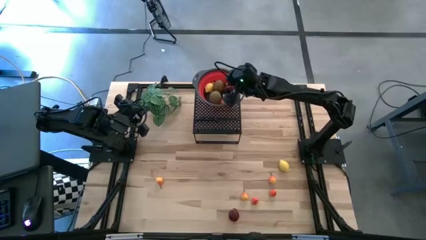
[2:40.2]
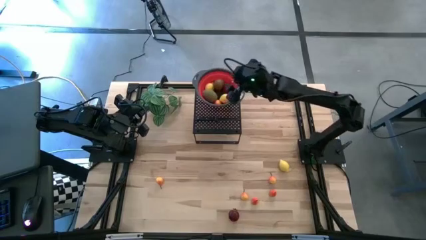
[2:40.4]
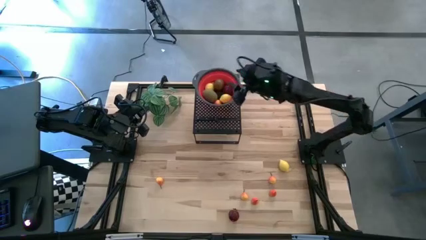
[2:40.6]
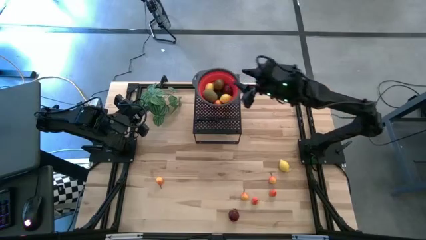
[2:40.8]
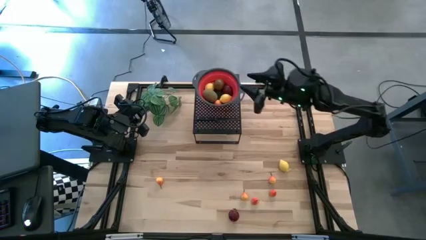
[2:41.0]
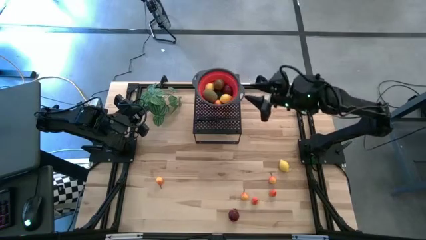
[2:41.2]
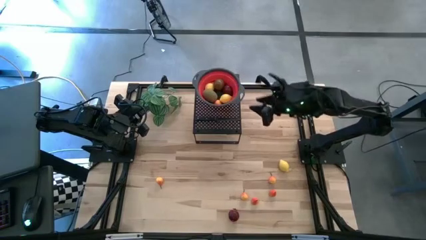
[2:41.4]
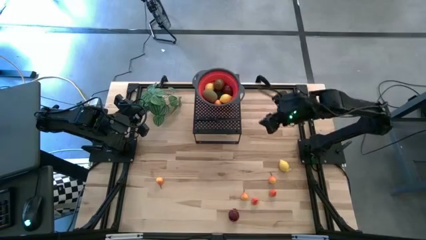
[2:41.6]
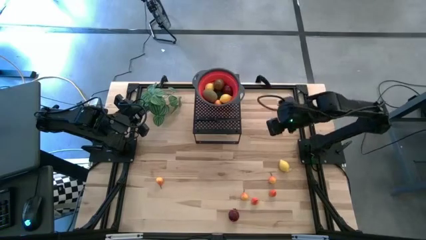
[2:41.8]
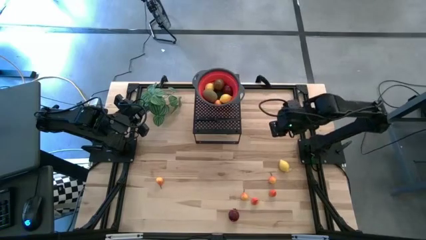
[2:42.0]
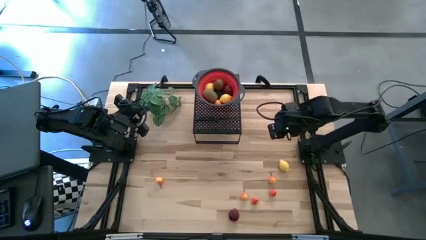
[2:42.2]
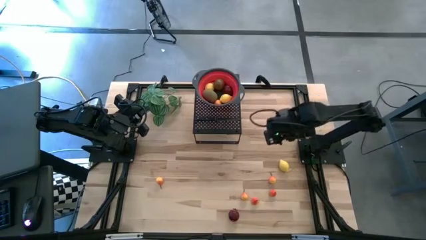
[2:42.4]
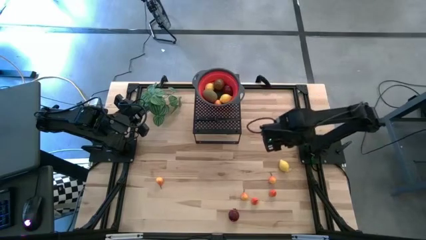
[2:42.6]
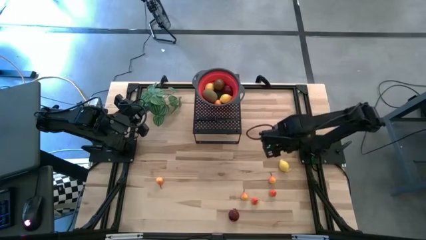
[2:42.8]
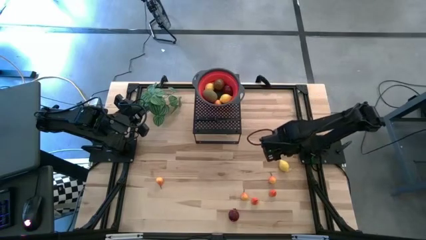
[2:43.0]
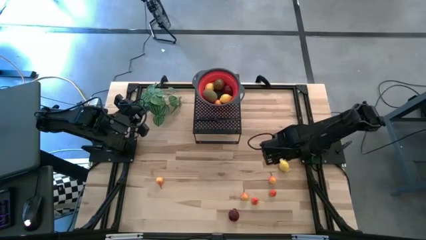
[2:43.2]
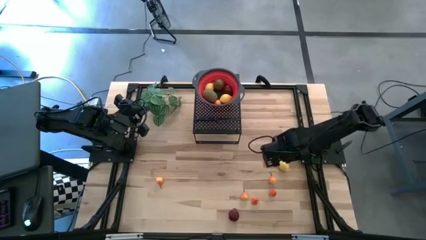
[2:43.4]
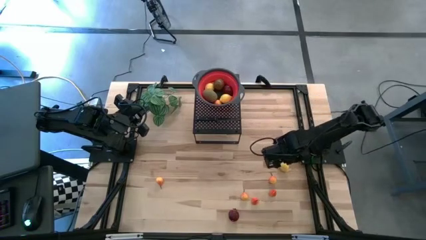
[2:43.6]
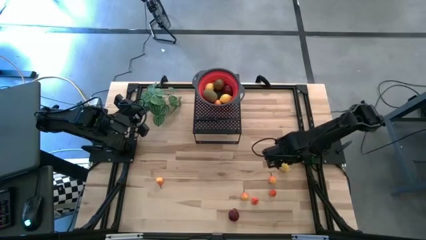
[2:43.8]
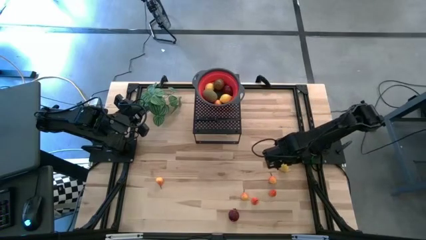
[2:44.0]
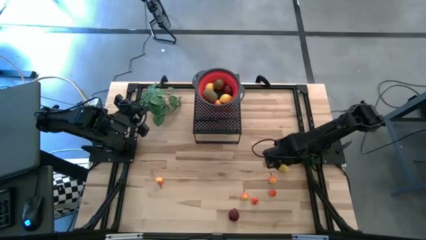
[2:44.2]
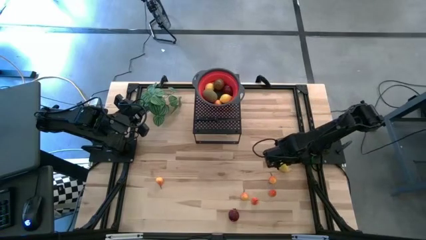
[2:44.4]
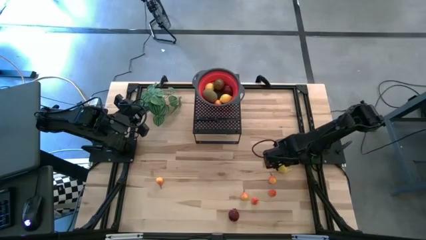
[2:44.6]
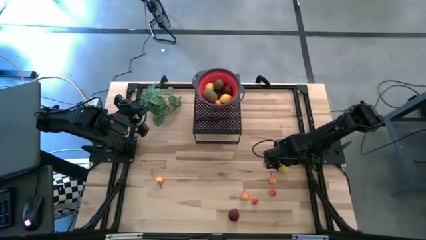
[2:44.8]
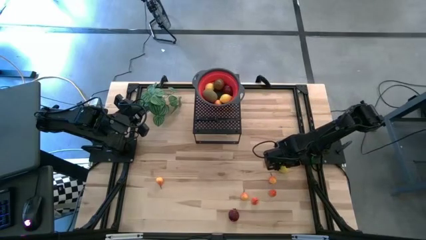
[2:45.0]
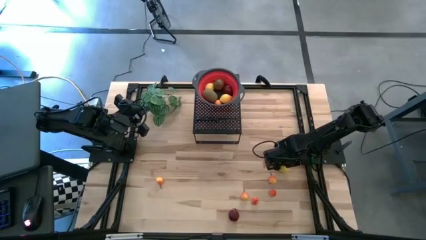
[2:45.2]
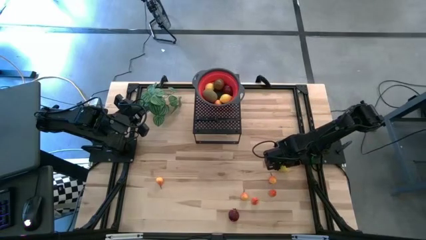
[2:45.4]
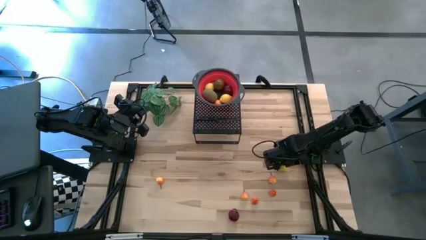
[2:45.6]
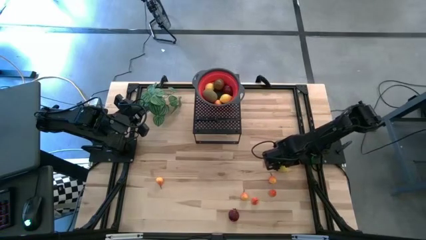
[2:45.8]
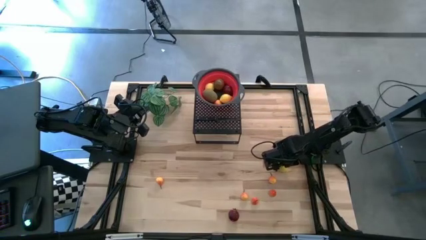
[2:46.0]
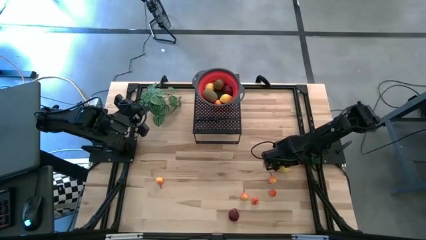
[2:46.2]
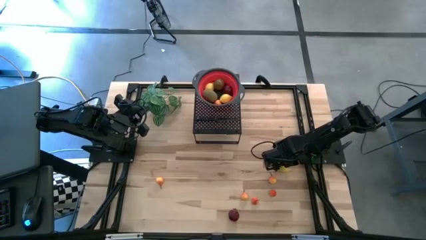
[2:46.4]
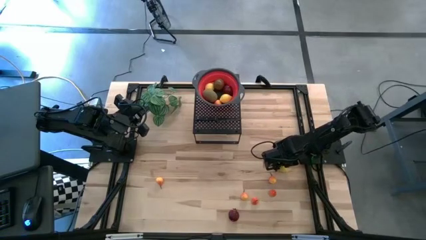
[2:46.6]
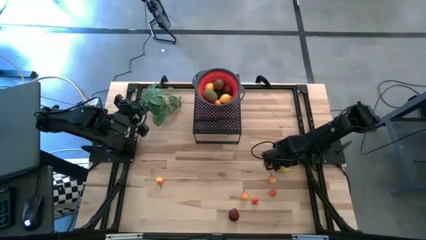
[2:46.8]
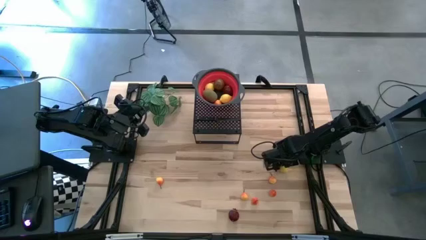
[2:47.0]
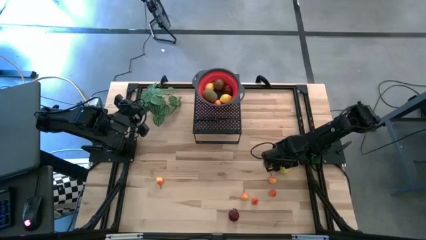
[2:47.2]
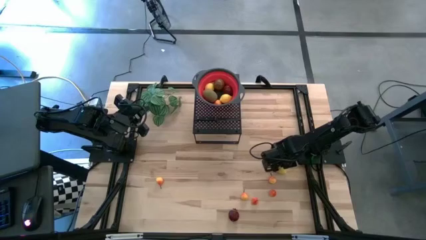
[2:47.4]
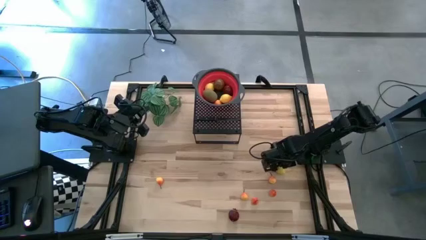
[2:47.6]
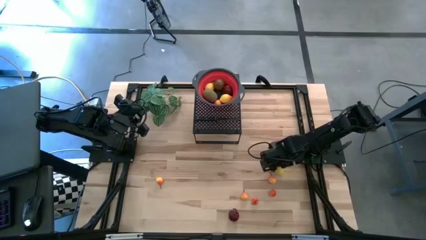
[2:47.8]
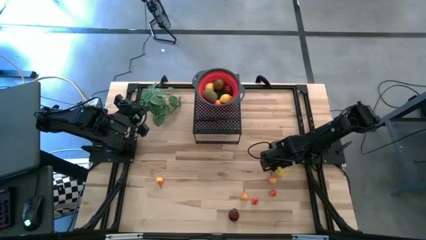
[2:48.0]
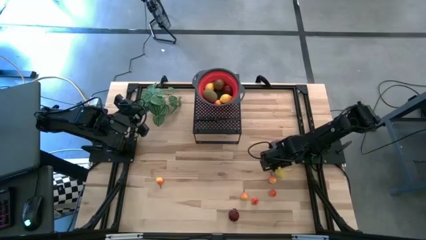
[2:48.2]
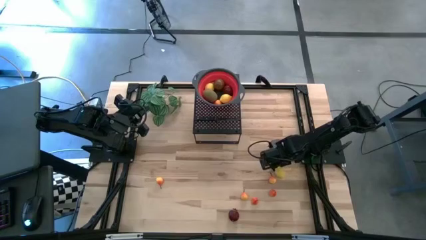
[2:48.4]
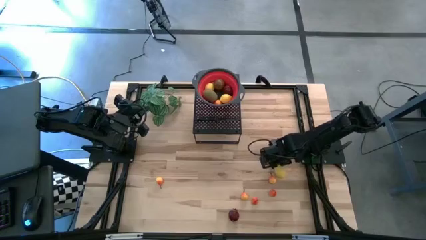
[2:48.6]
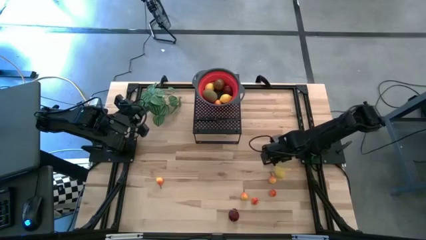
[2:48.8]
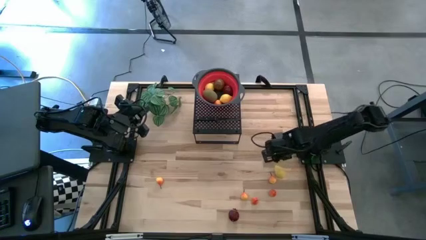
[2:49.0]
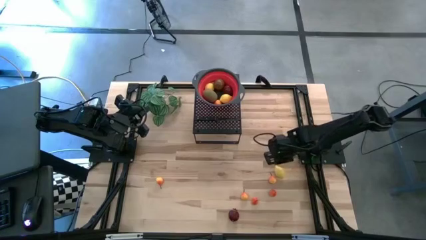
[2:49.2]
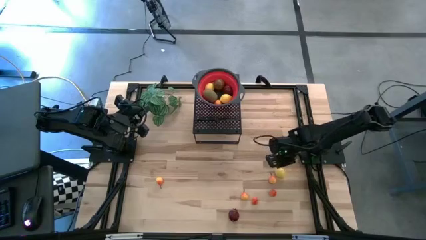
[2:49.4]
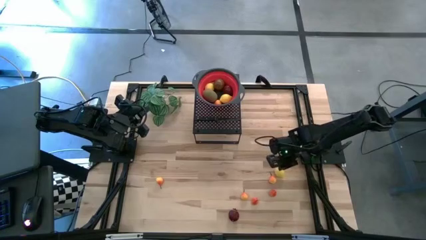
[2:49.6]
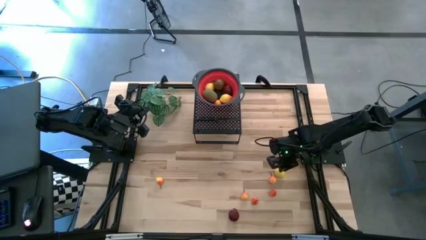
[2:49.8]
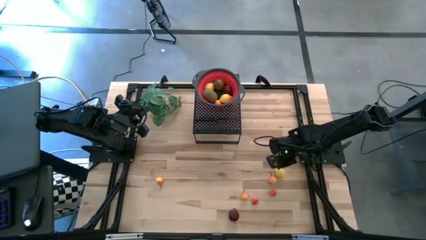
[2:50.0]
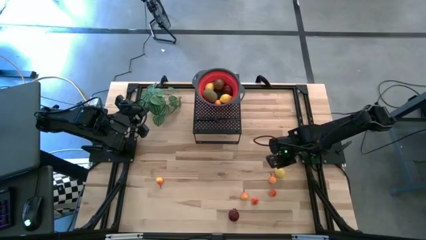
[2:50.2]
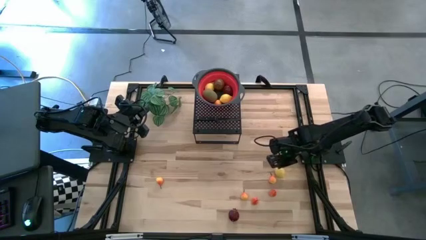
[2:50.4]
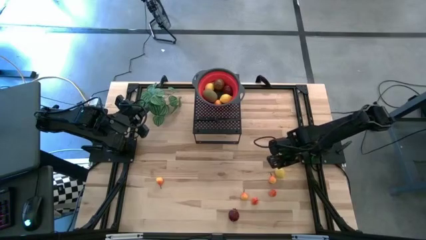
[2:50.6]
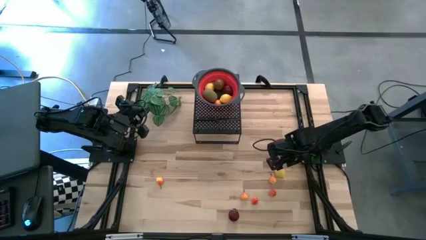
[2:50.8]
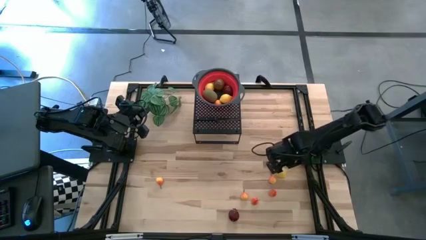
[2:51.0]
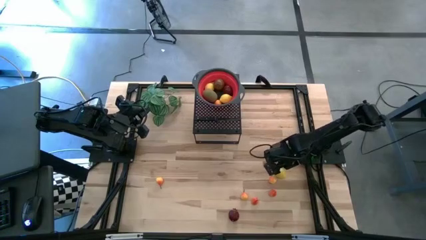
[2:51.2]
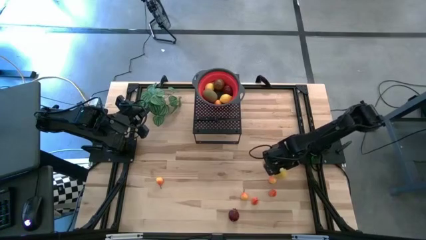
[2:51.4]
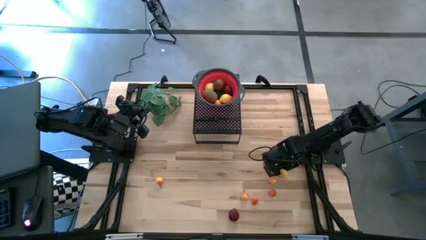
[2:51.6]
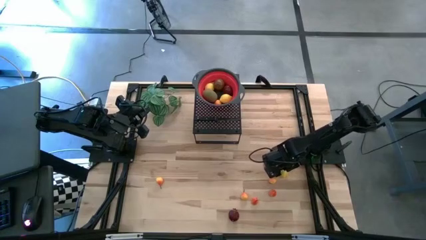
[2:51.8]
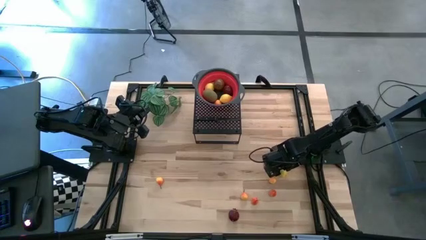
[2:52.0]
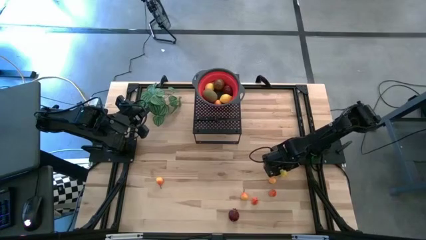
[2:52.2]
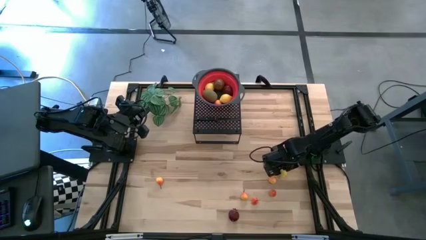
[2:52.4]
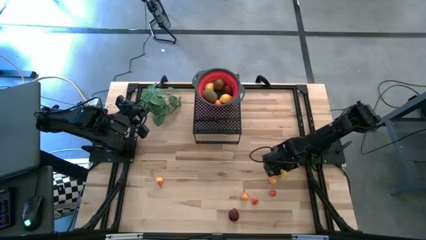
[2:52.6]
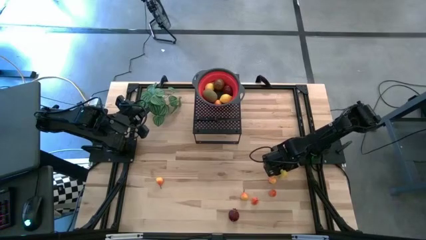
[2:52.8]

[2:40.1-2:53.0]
Task: Pick & Place Fruit
Put the lemon into the red strainer bowl

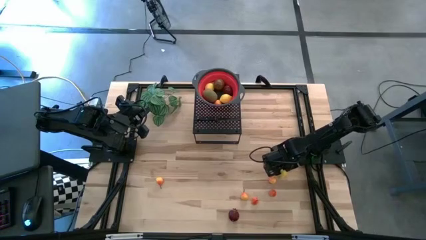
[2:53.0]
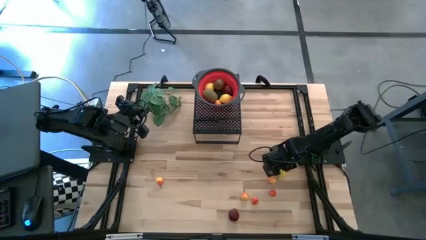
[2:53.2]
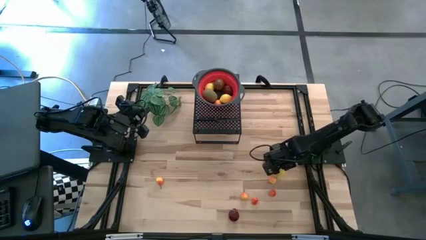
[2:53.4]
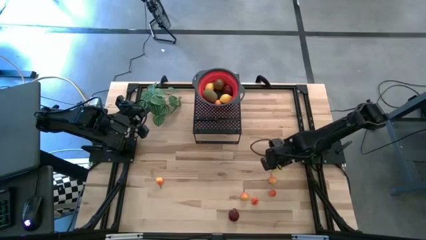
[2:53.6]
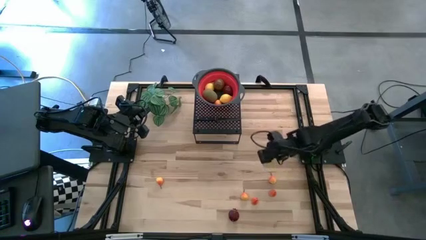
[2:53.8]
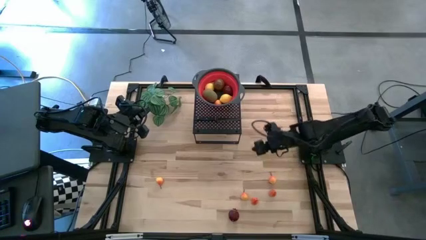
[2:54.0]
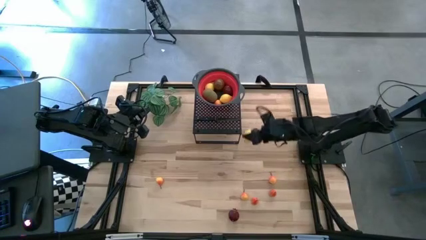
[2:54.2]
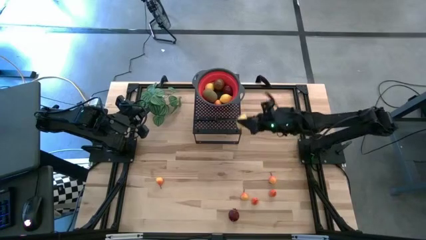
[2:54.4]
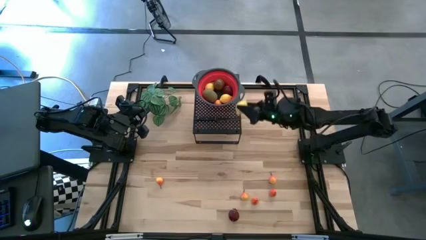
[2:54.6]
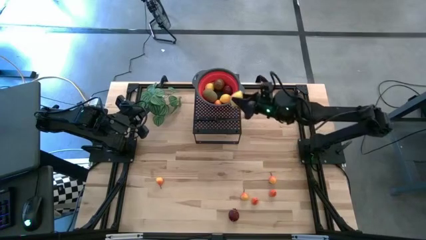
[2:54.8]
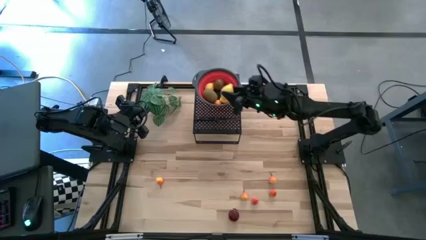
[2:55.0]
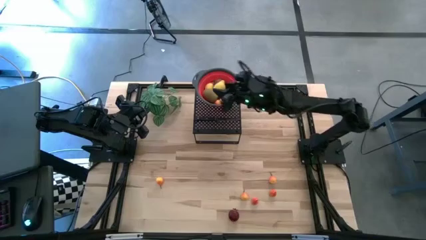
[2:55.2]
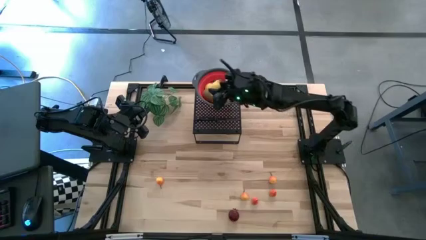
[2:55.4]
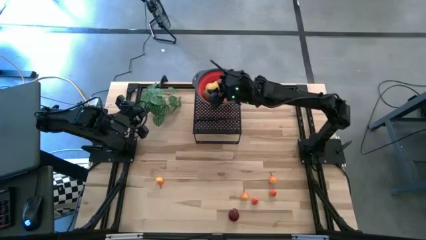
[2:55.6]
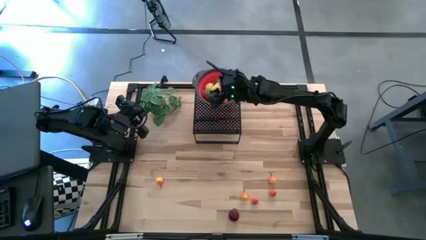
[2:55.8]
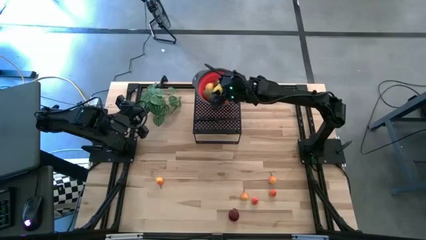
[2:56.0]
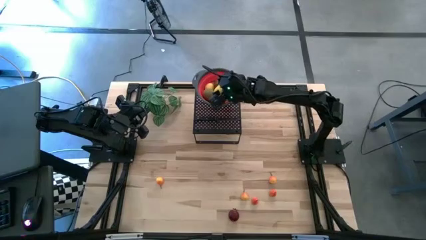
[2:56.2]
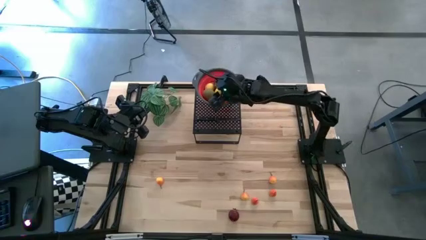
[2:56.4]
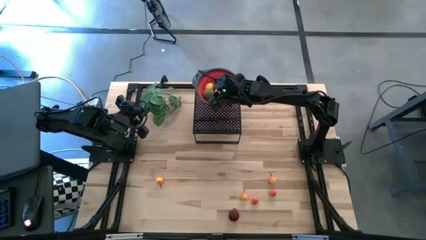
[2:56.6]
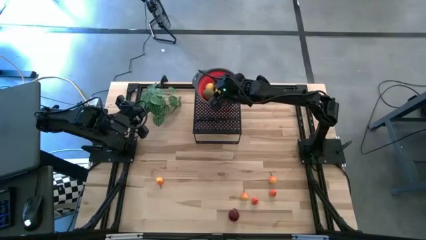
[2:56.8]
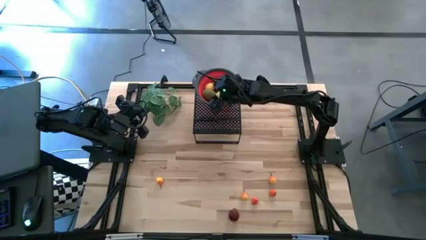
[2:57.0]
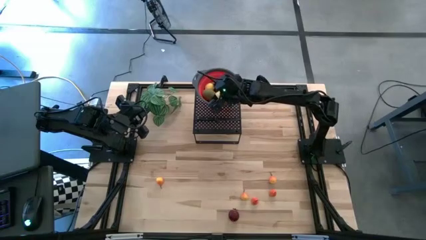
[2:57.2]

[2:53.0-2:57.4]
Put the lemon into the red strainer bowl
